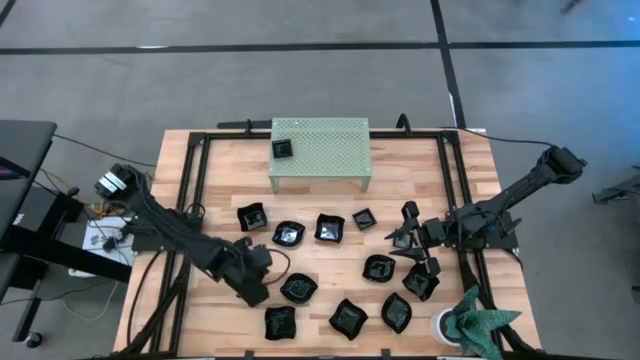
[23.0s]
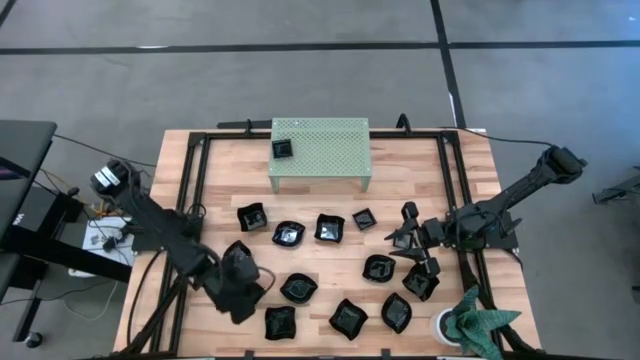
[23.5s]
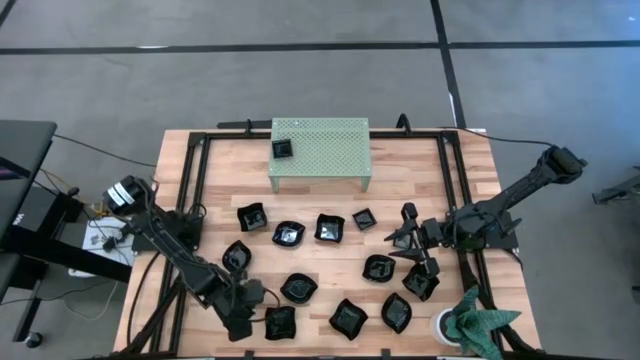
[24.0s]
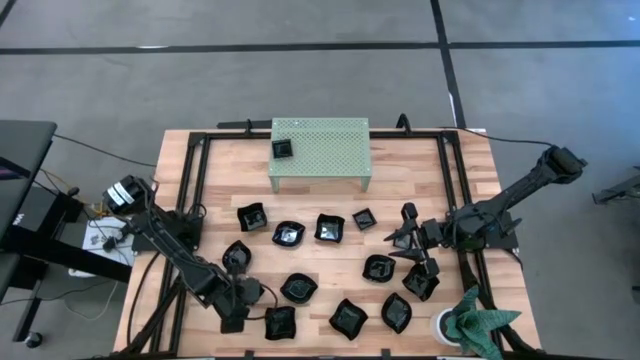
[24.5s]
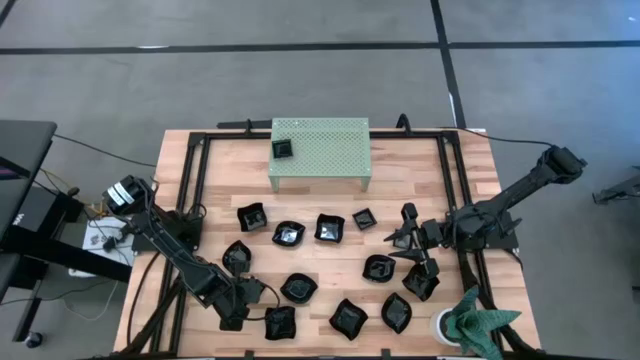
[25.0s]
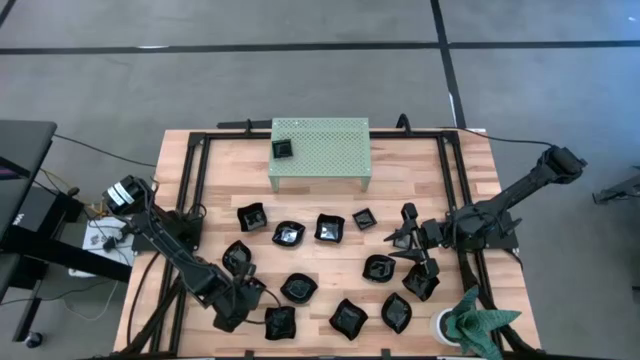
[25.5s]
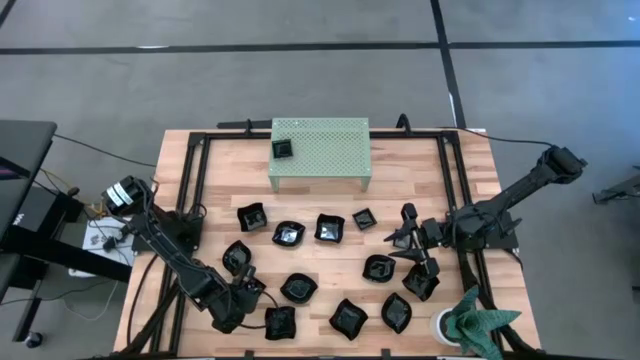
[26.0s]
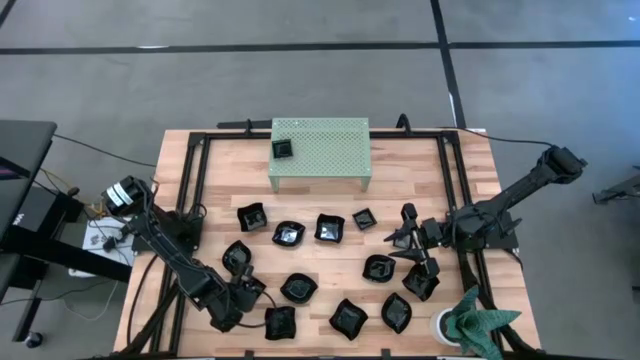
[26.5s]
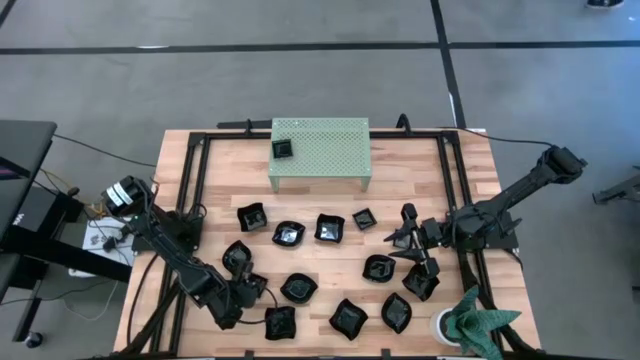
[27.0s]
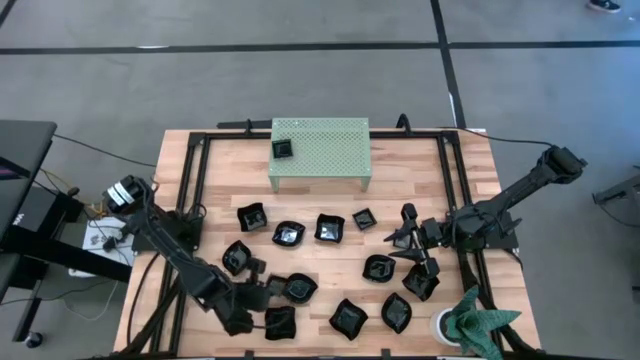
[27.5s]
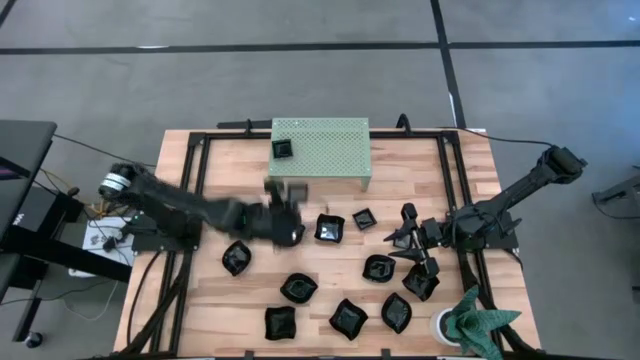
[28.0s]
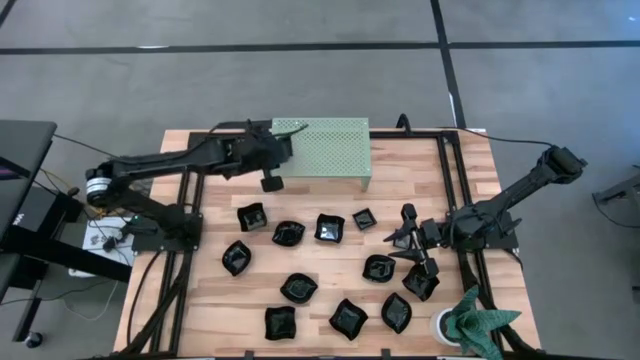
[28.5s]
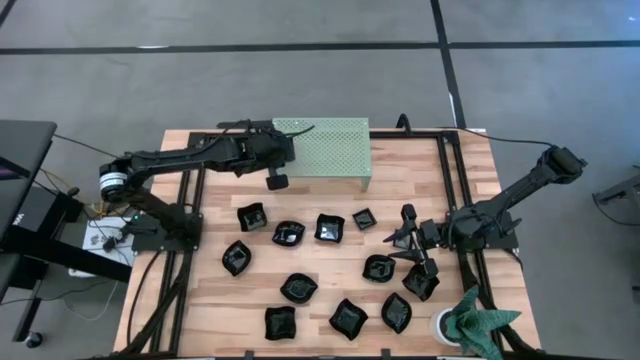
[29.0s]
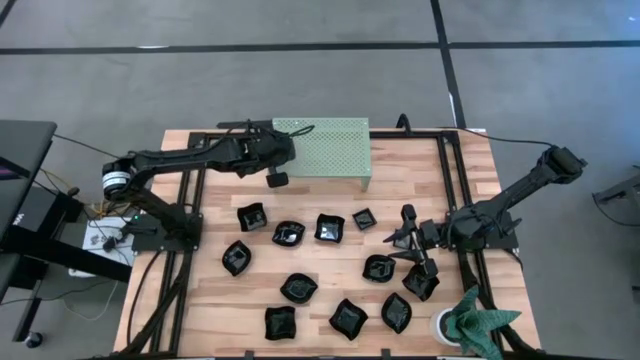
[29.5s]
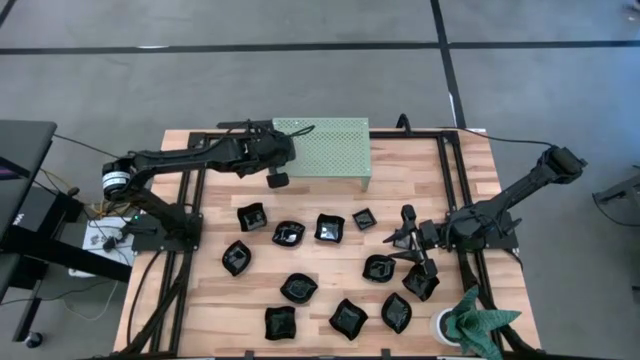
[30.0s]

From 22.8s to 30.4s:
Task: Pick & Place Mini shaped plates
Stack the black square plate on top of the black square plate on the shelf

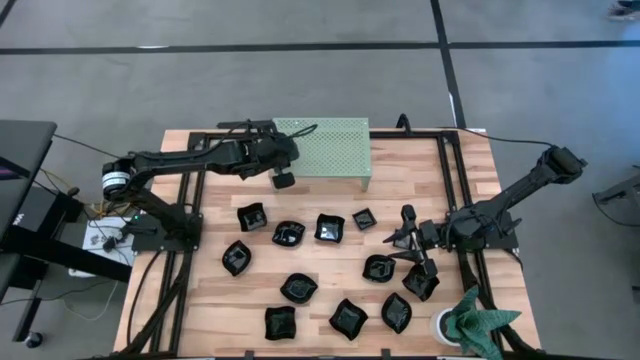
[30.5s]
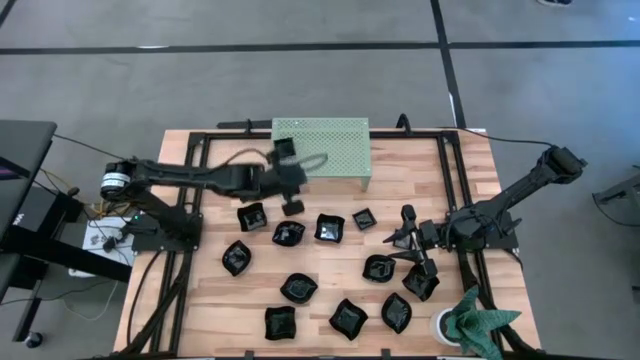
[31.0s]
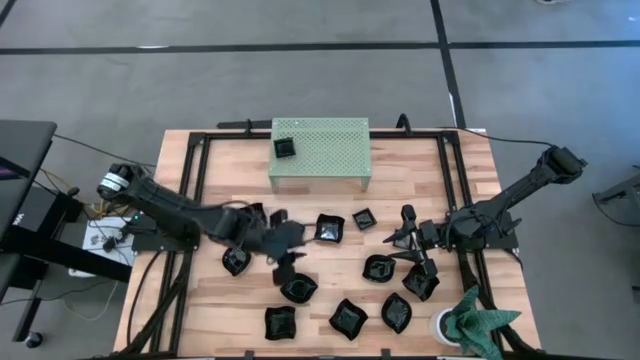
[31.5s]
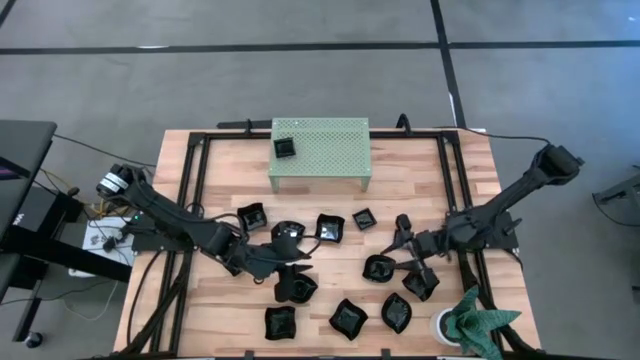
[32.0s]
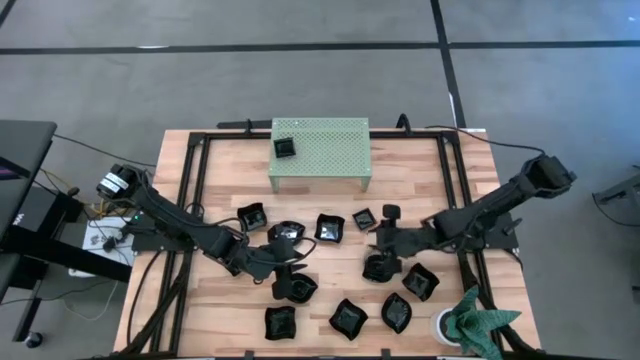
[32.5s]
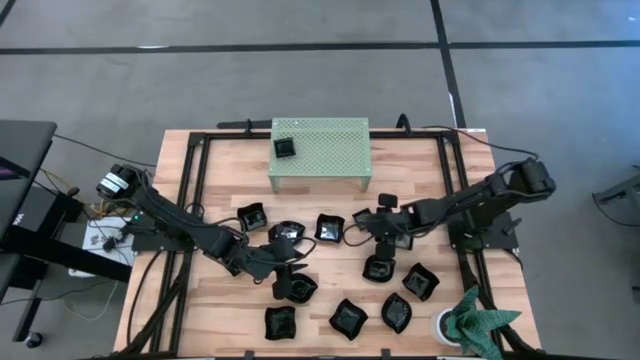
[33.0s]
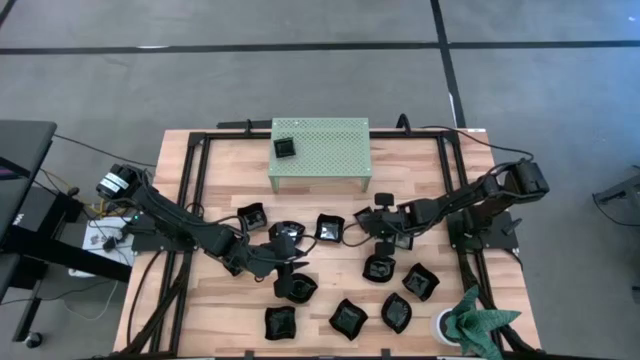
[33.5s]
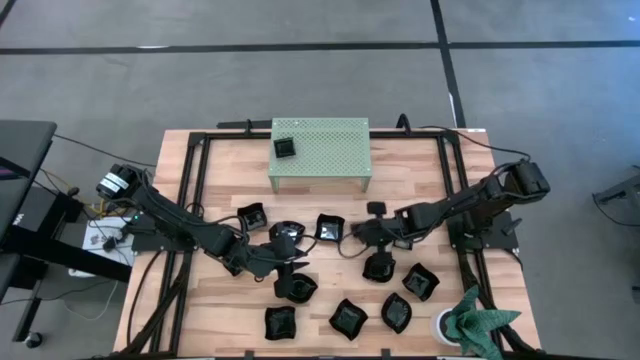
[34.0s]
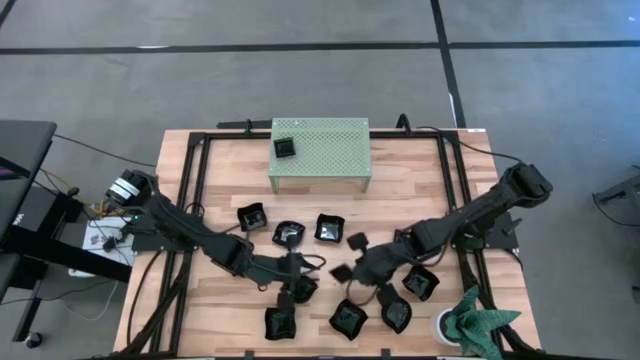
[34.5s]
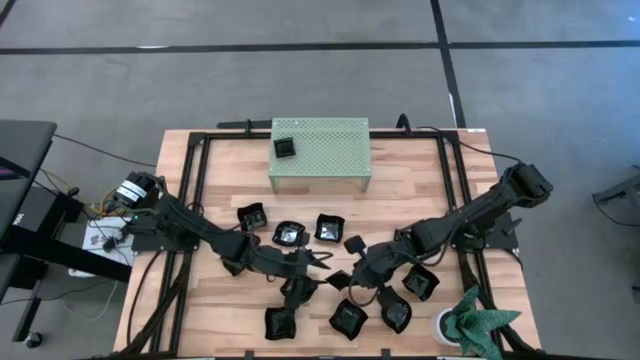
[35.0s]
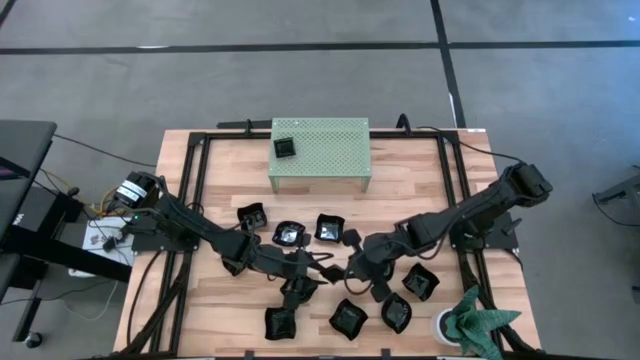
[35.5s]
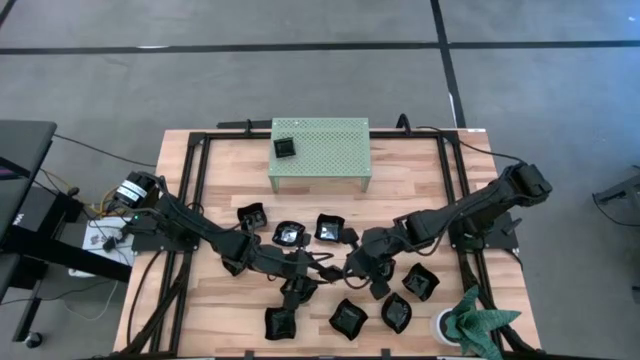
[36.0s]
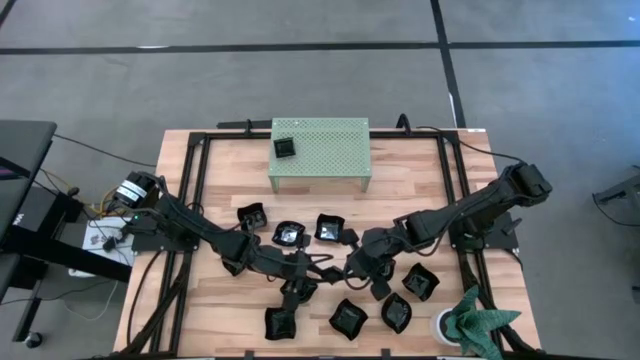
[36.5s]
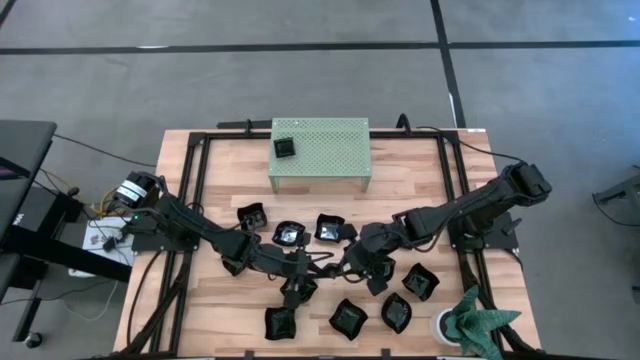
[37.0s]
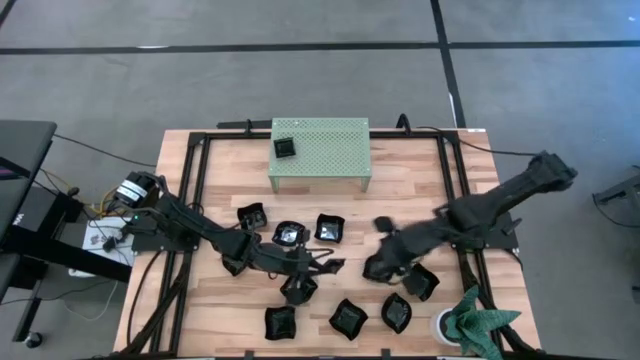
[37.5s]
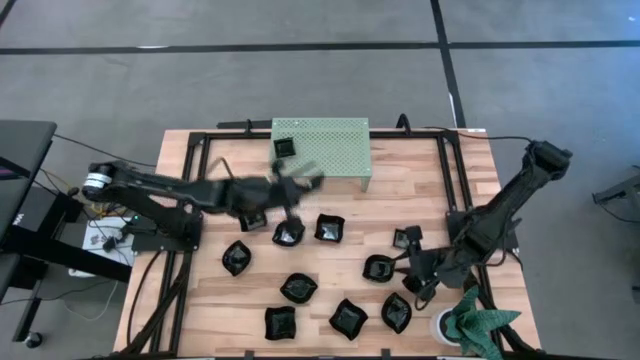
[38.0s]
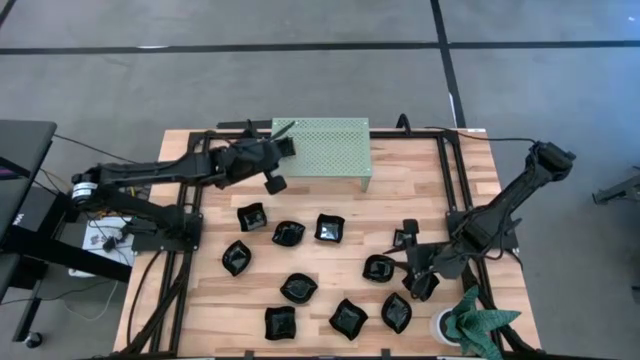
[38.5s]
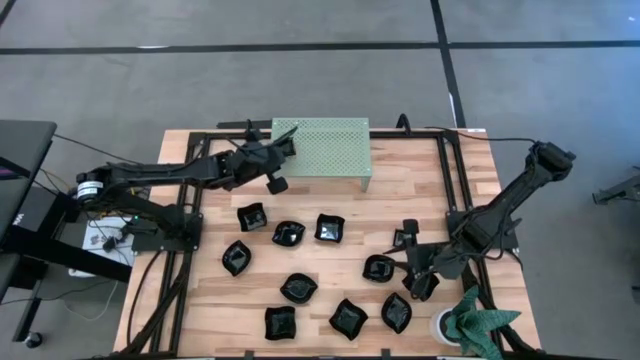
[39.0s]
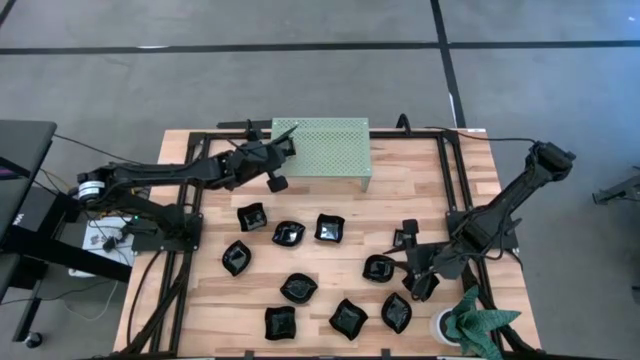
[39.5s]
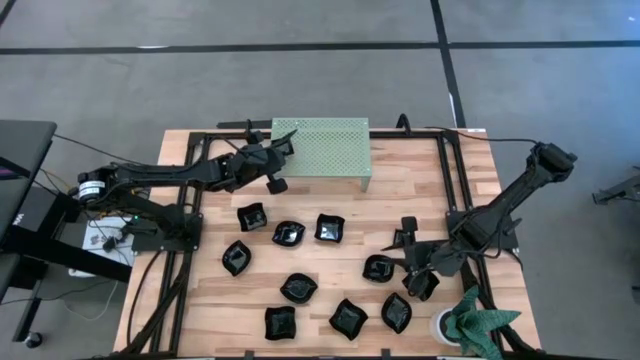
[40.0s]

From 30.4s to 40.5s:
Stack the black square plate on top of the black square plate on the shelf

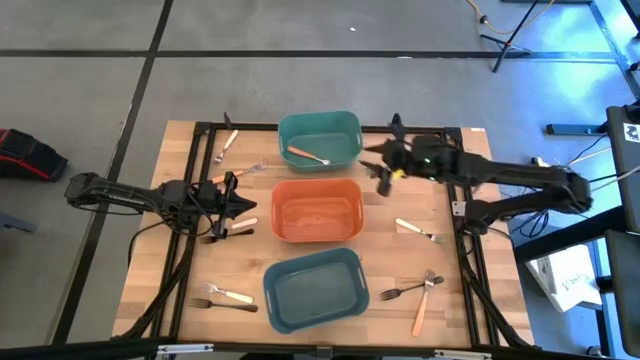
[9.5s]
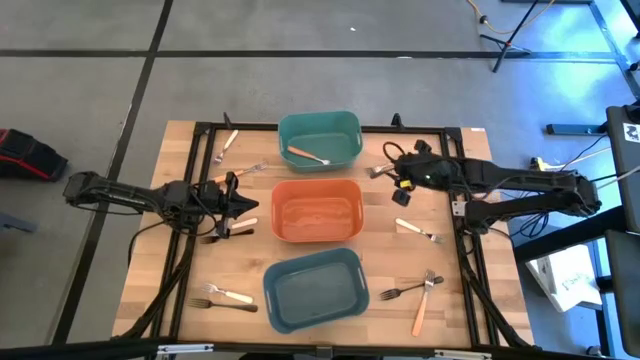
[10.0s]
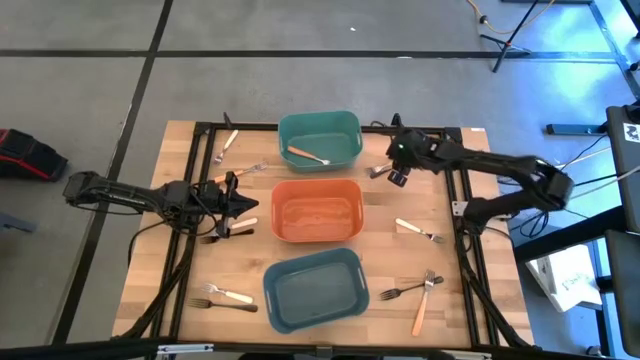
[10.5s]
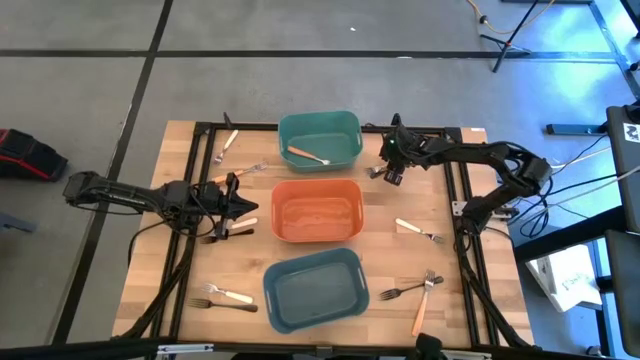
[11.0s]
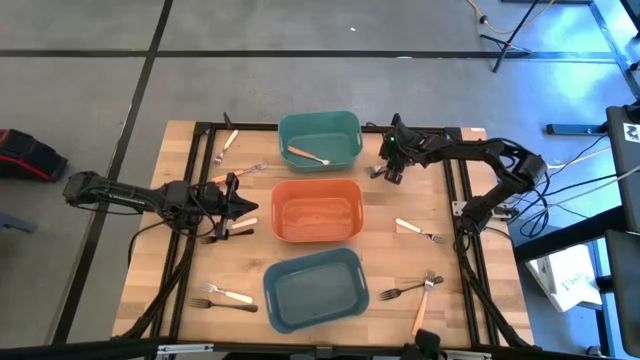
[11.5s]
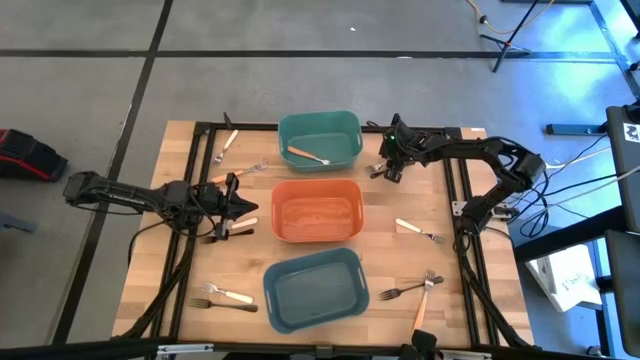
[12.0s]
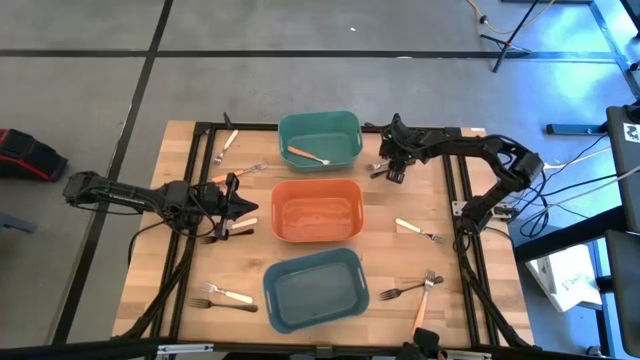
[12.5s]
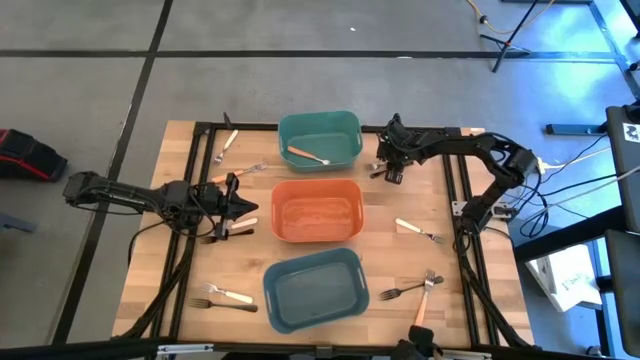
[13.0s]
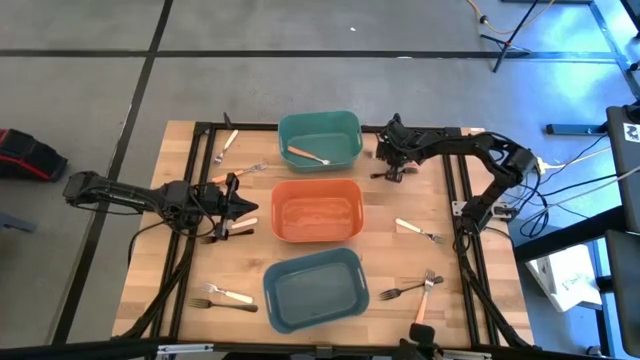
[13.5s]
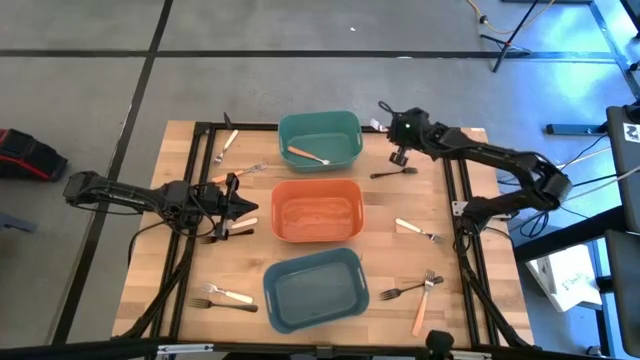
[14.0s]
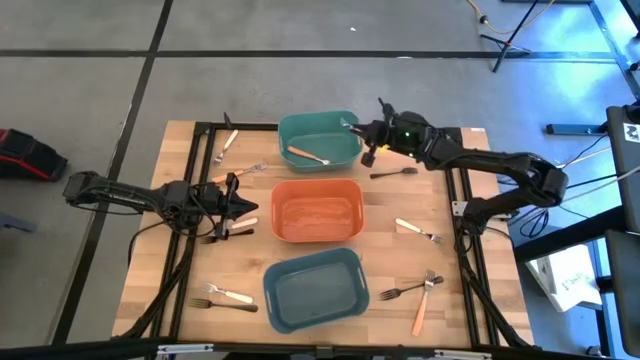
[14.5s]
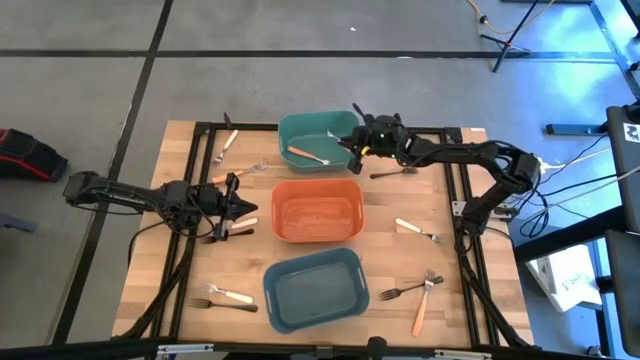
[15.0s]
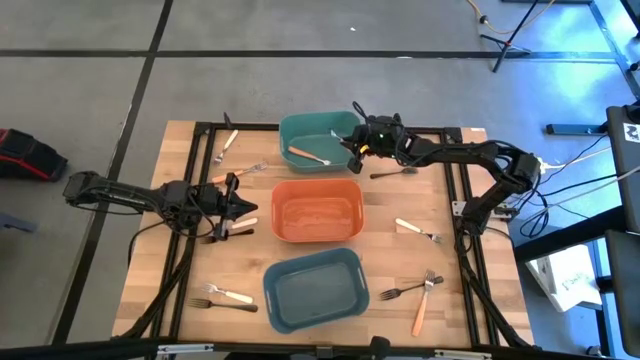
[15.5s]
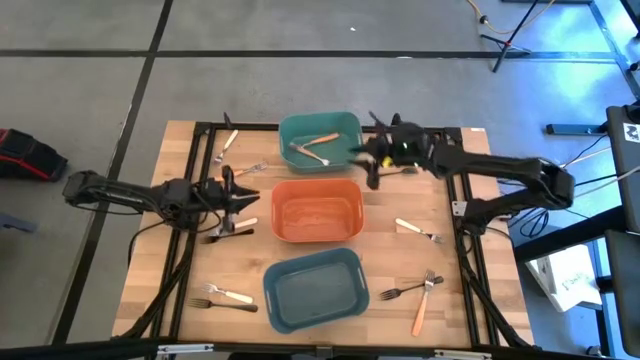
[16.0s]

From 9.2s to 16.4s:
Task: Sort silverware by color (type)
Put the orange fork into the green bin
